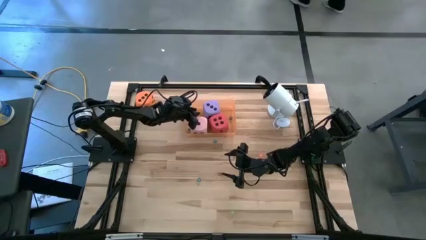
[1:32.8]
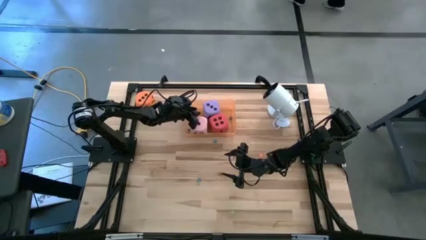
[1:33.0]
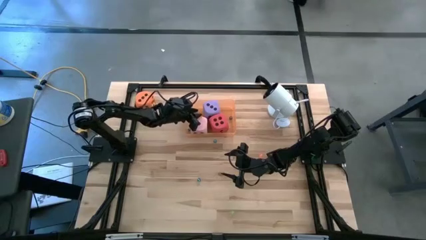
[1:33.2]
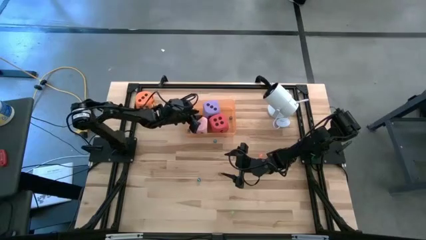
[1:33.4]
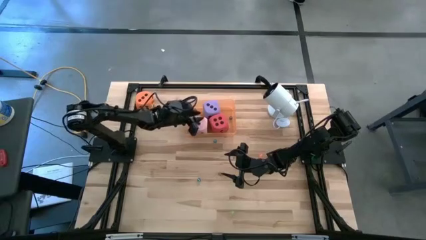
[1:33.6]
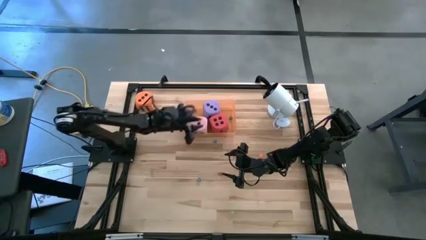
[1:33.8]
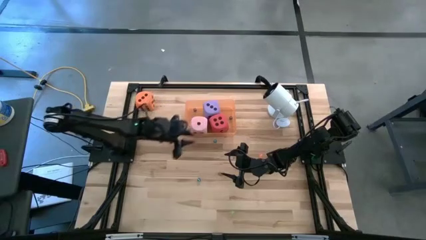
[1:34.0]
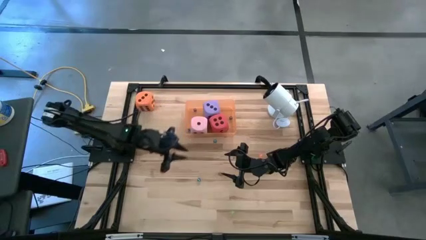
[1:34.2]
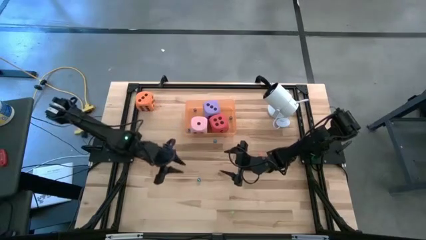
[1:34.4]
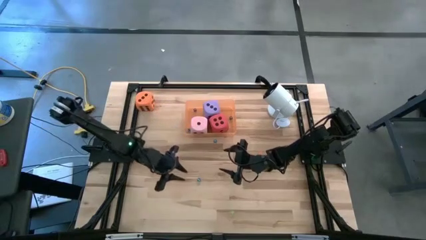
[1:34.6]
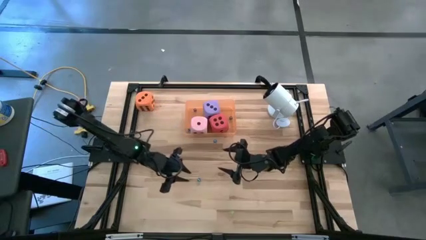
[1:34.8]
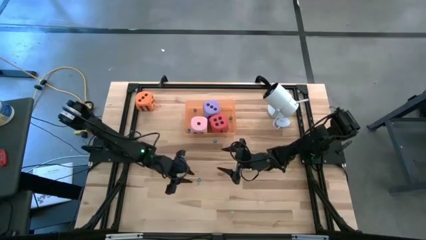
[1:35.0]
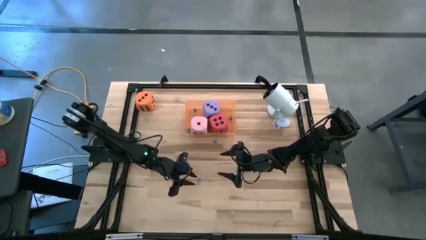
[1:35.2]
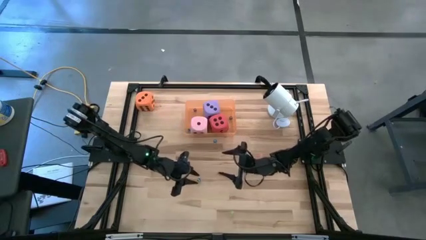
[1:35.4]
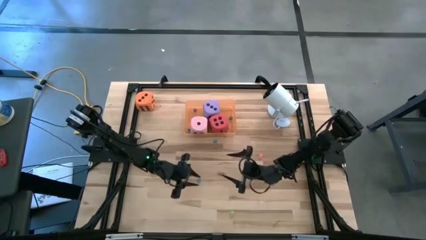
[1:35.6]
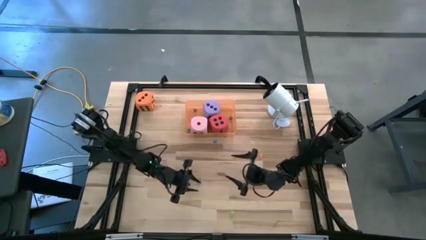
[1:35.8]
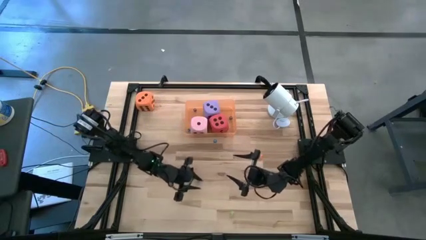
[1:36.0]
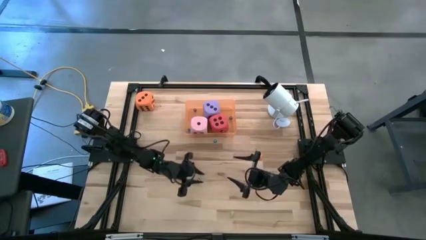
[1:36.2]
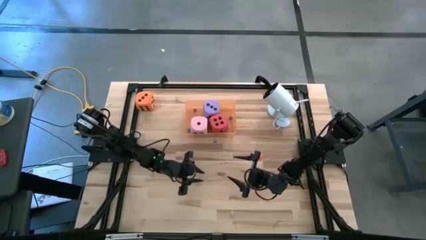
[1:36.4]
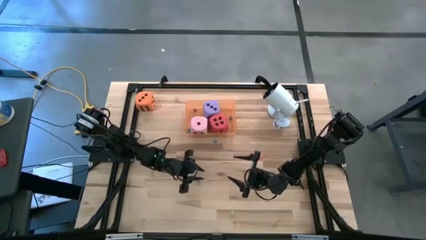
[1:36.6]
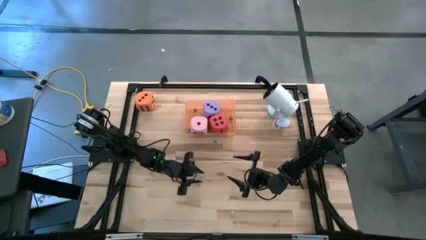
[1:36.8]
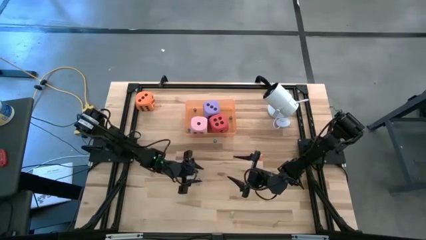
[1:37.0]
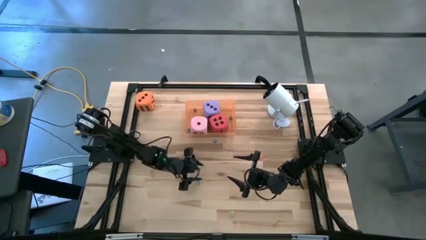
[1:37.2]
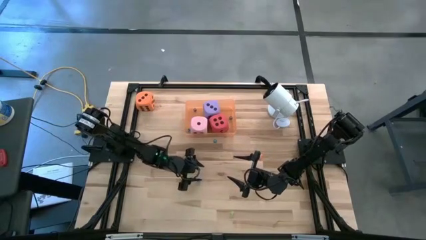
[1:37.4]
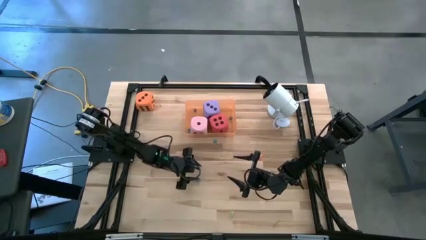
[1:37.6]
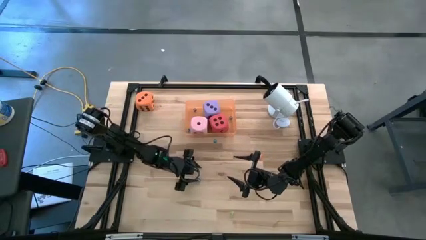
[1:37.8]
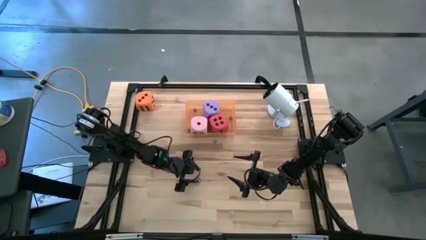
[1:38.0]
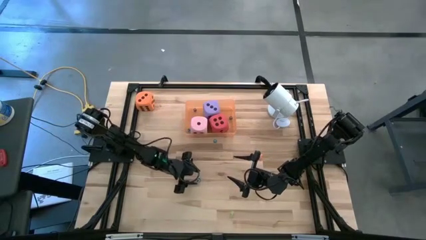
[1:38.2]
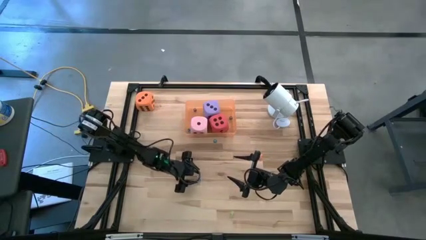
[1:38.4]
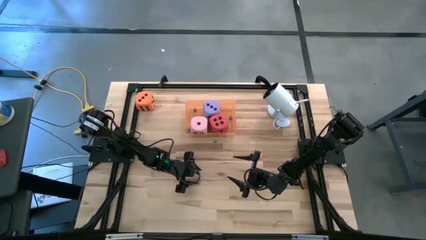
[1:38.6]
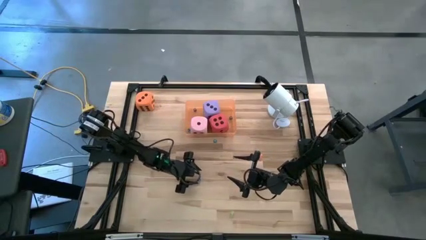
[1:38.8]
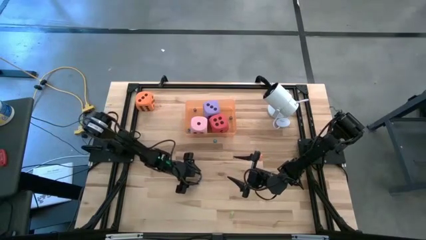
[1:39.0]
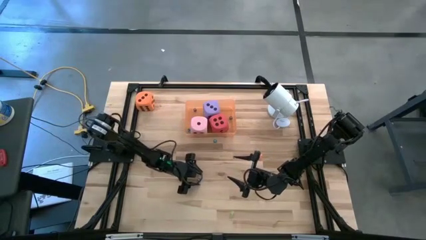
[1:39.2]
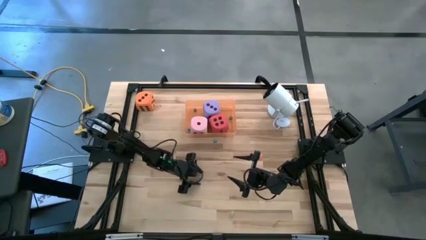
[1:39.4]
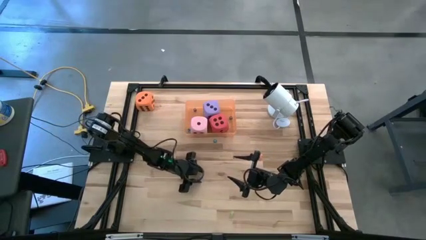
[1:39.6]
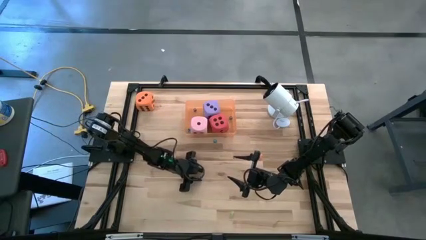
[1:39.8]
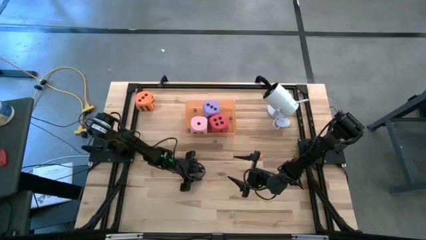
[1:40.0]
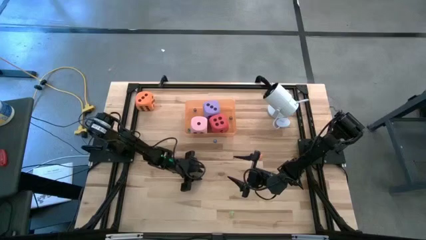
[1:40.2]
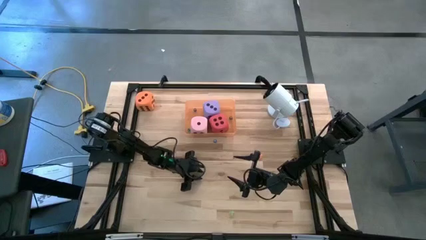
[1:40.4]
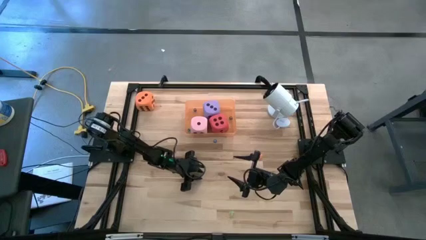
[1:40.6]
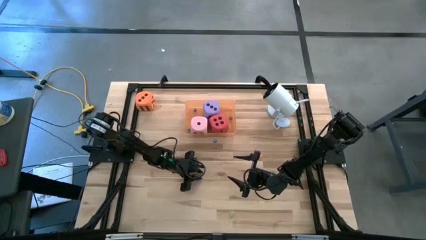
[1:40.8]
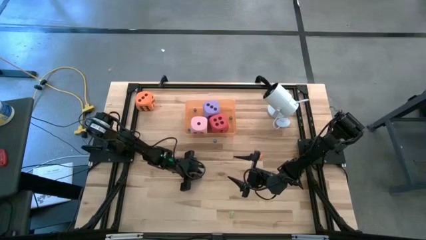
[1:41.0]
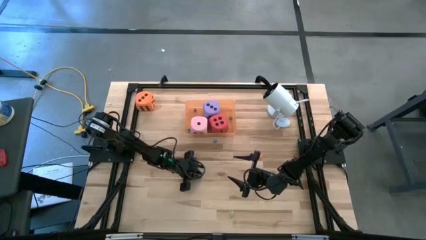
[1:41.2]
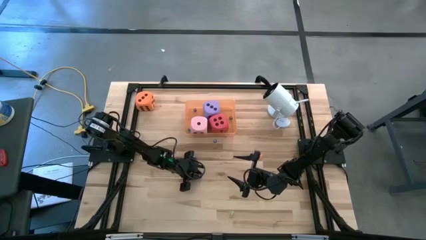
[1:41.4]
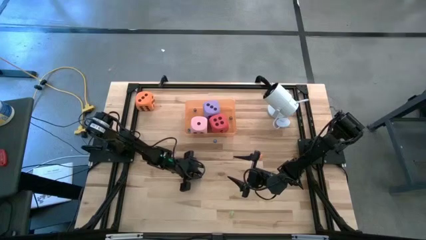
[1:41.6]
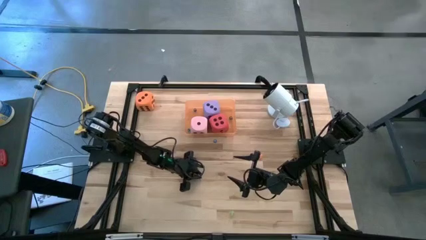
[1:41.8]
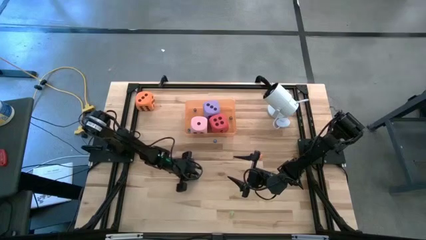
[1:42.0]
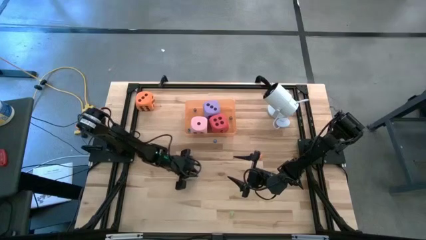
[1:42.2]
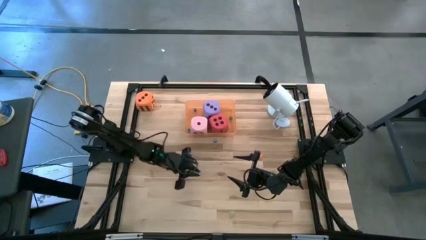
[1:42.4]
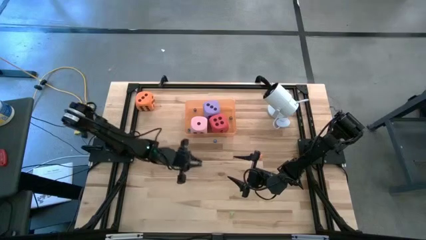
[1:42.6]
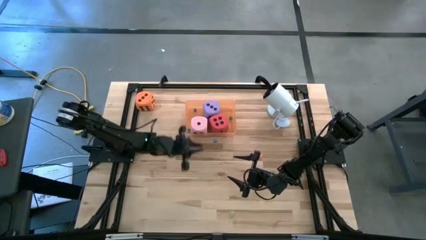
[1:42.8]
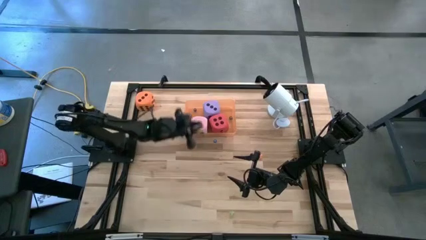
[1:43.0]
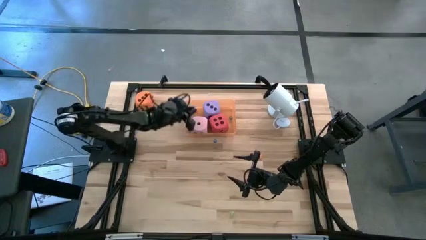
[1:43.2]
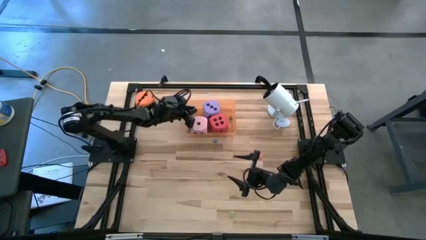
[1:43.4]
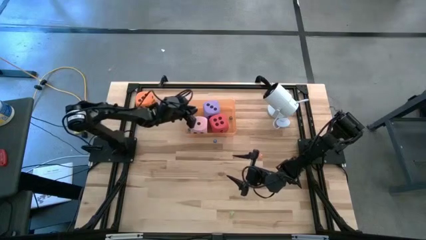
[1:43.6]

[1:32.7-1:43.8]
Task: Pick & Place Dice
Put the small light blue dice in the orange bin

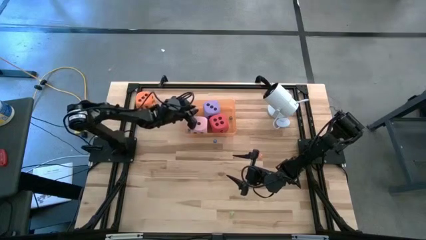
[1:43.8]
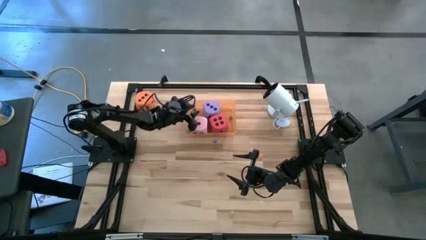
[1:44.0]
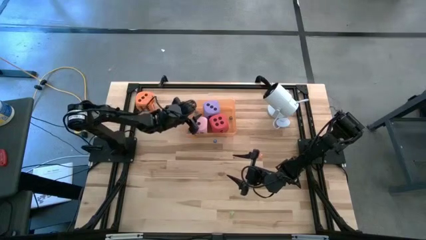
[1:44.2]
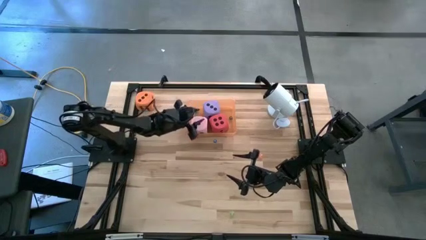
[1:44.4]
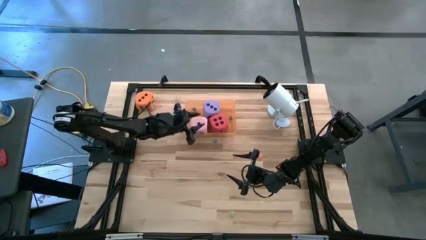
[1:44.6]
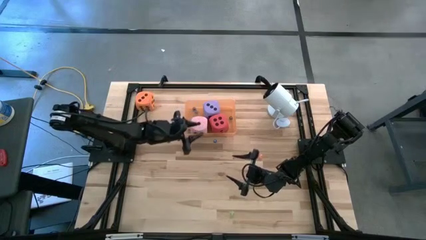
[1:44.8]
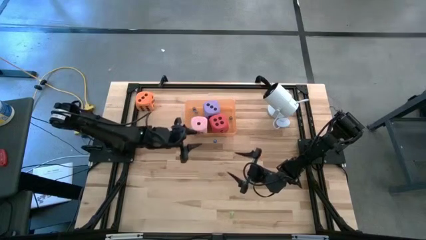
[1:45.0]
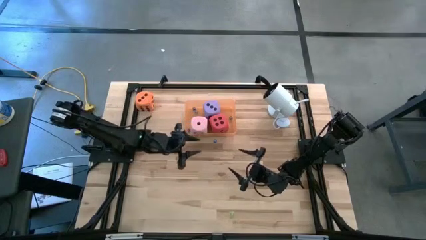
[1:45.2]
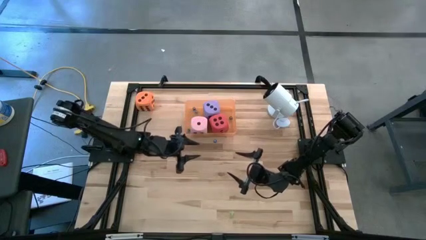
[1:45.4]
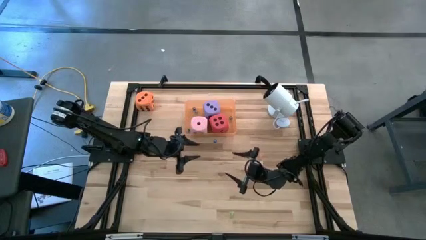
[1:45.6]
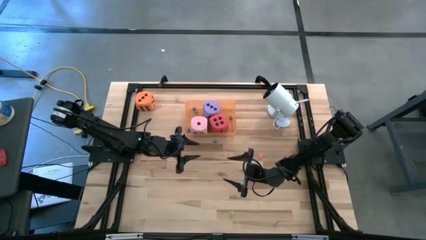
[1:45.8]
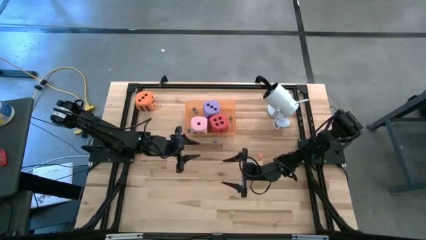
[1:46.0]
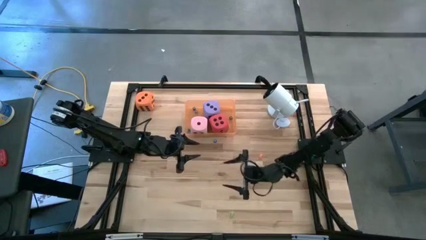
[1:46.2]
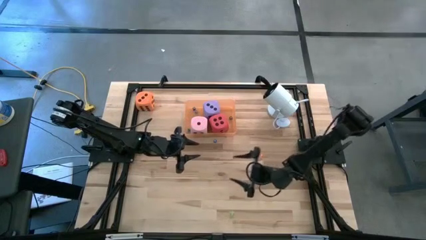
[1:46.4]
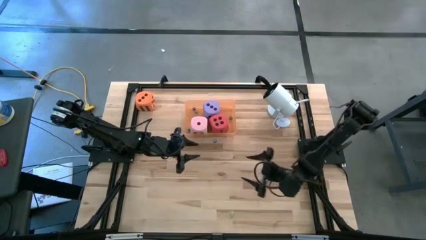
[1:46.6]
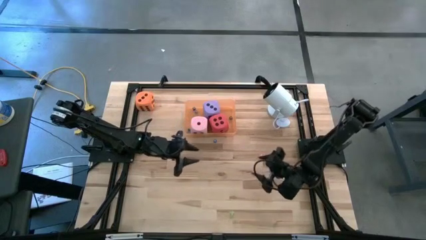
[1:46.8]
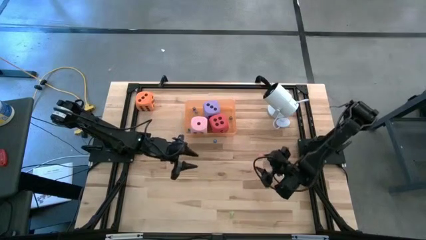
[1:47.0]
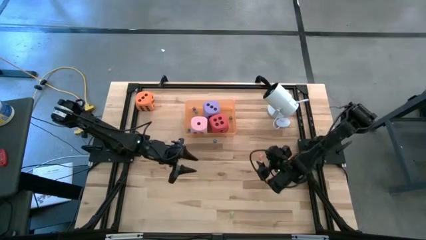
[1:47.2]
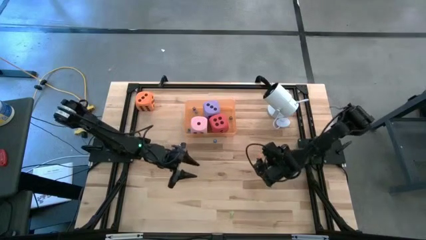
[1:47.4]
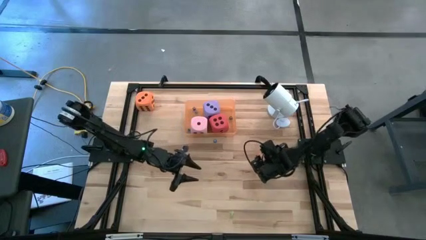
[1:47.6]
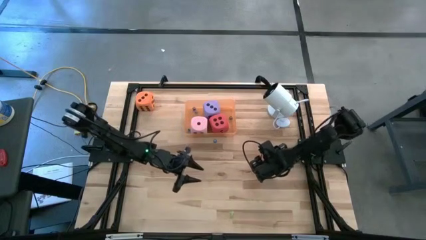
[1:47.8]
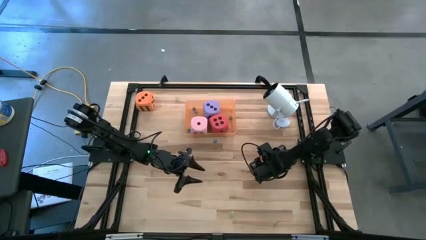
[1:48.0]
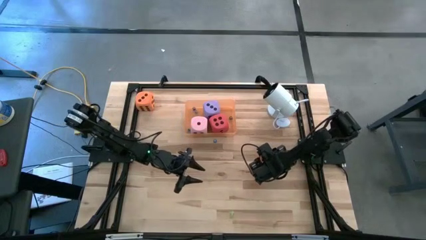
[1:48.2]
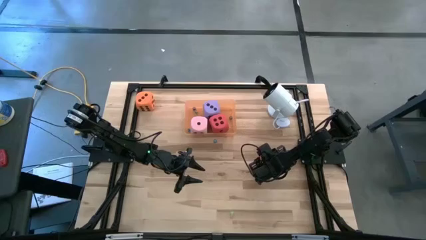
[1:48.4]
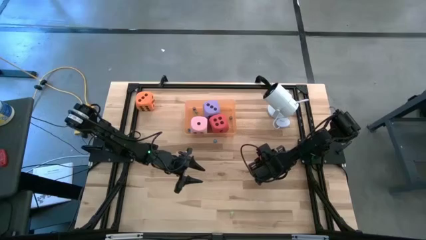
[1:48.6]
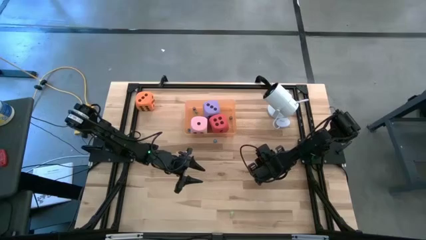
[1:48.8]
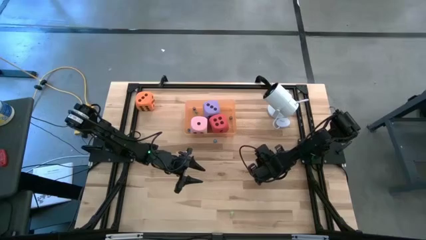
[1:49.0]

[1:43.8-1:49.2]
Put the small orange dice in the orange bin
